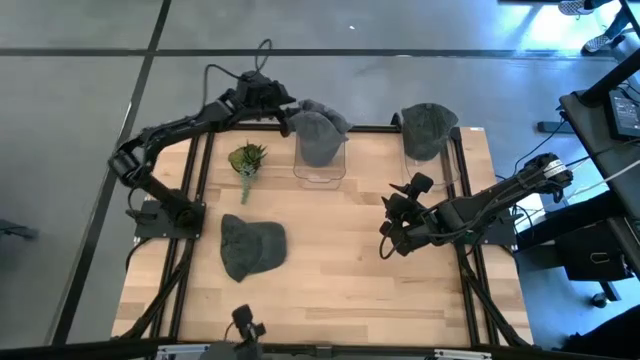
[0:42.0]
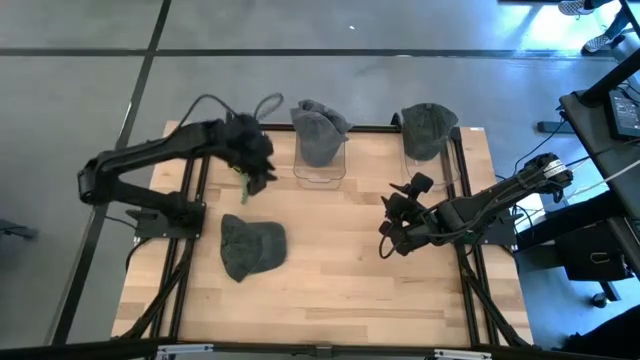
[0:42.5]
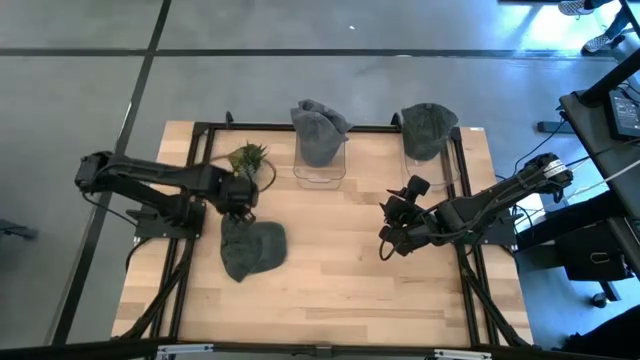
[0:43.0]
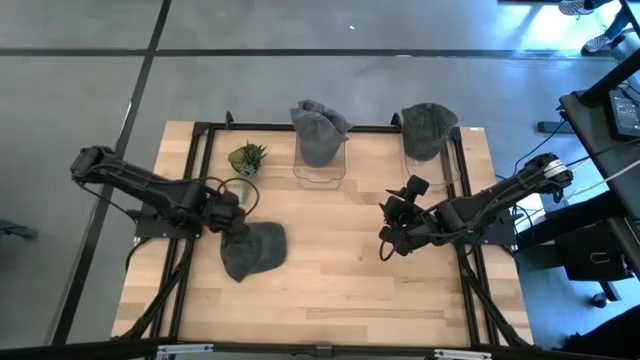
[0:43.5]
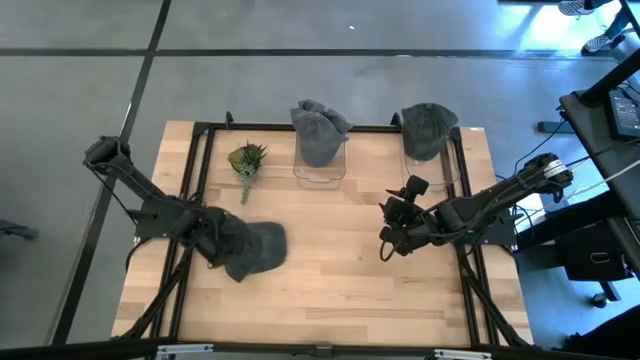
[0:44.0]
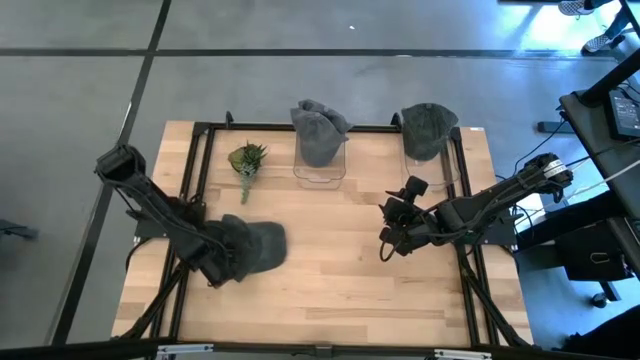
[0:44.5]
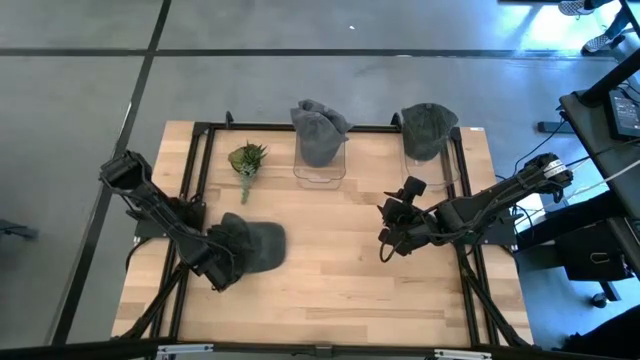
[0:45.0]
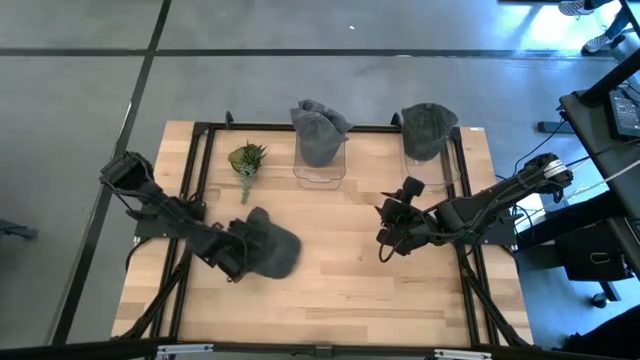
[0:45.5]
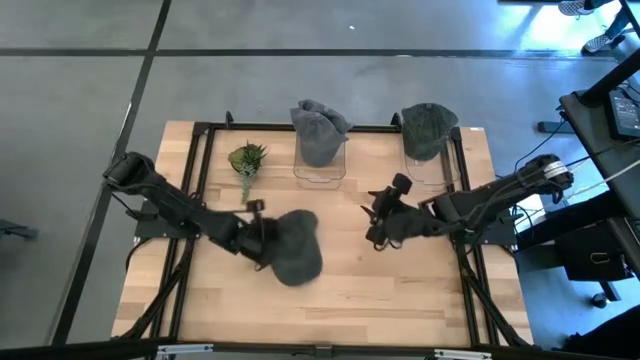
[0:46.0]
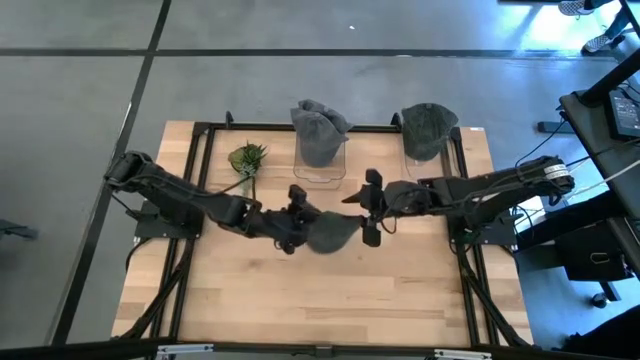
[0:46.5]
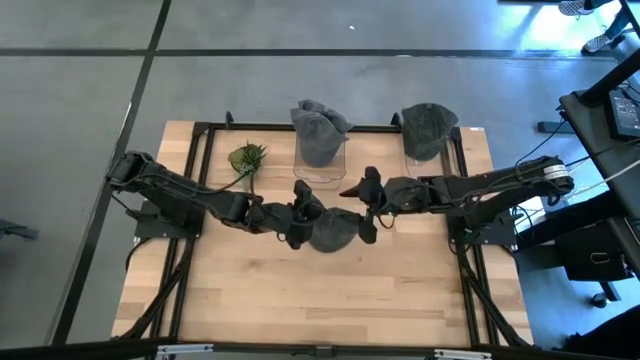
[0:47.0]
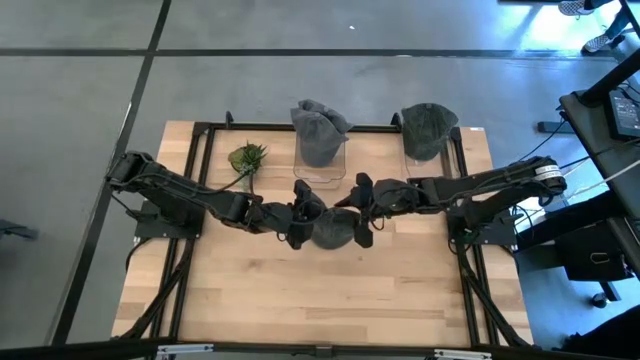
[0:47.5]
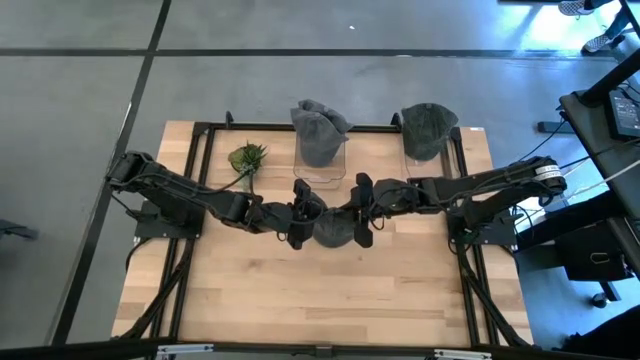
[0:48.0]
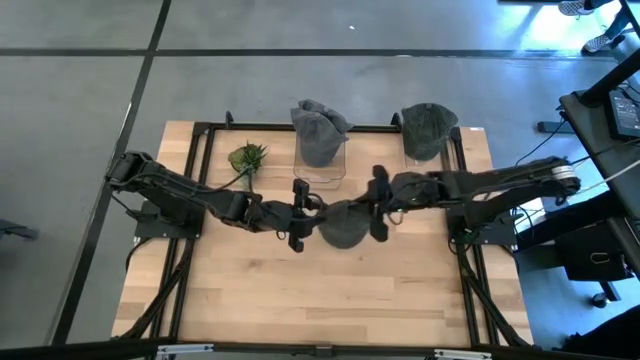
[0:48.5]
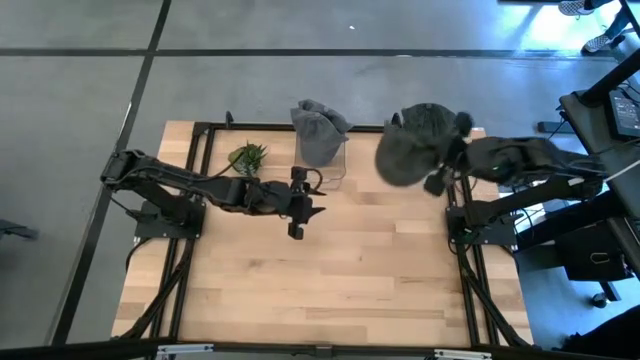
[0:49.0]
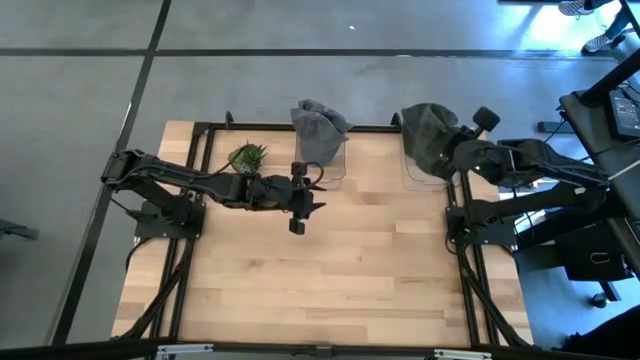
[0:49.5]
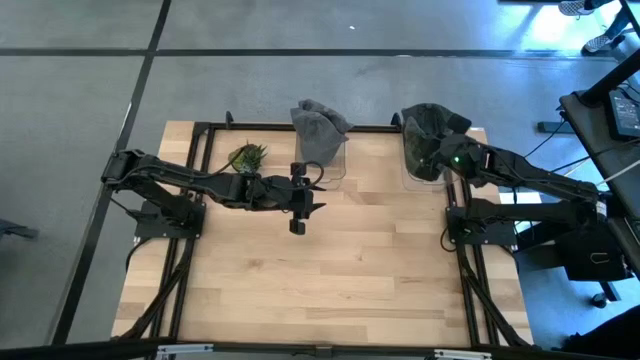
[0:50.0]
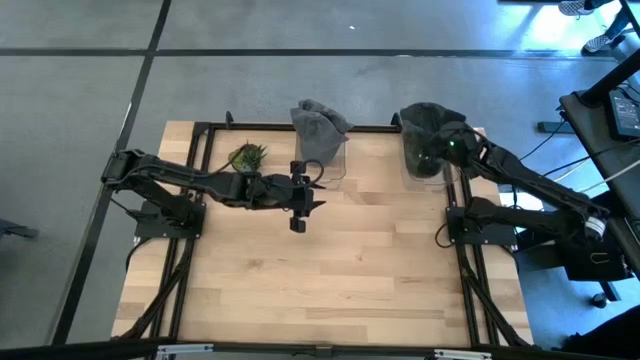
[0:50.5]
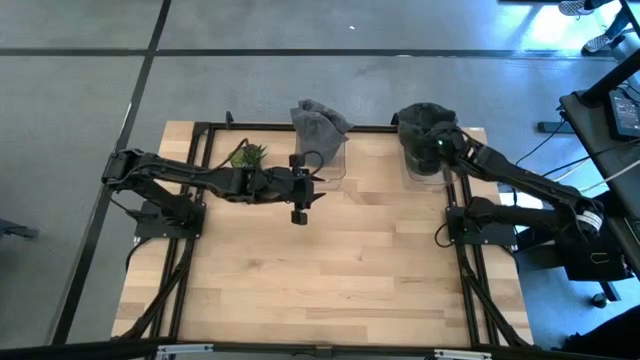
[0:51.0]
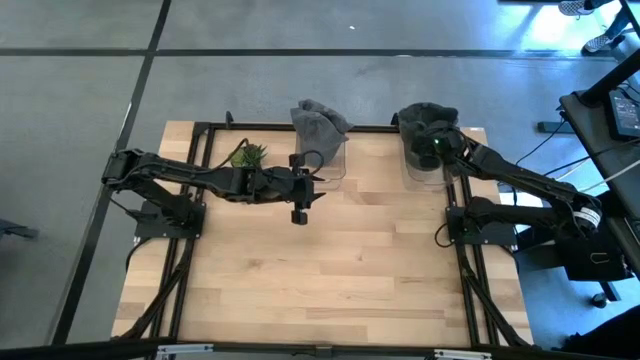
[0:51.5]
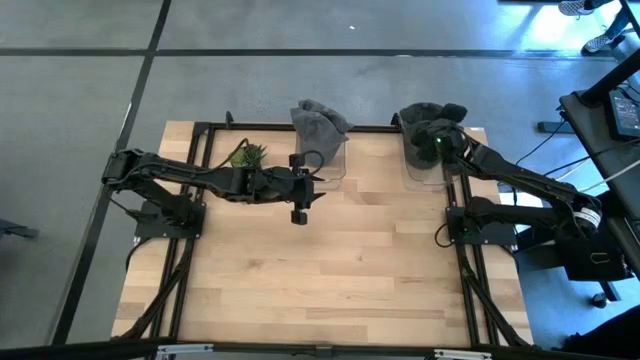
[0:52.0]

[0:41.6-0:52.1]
Task: Pick & Place hat
Put the green cap into the right transparent bin

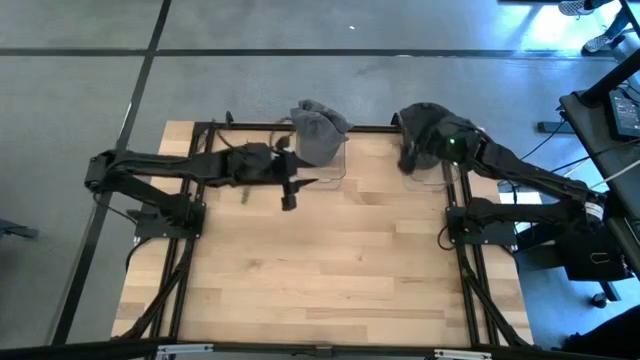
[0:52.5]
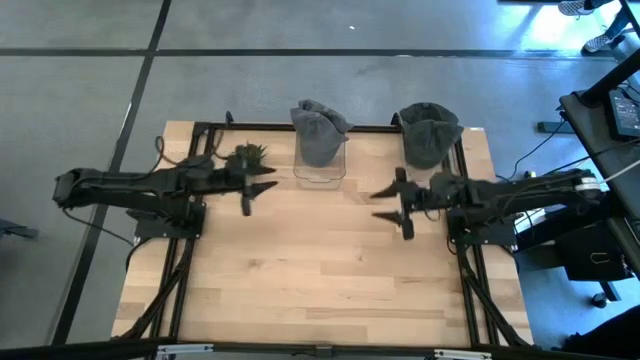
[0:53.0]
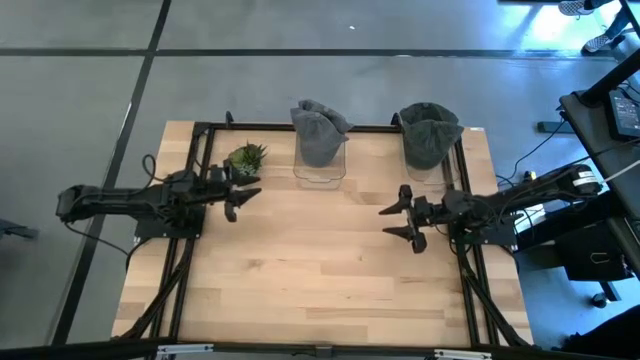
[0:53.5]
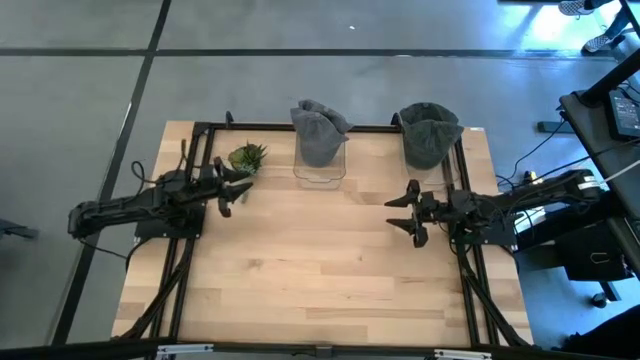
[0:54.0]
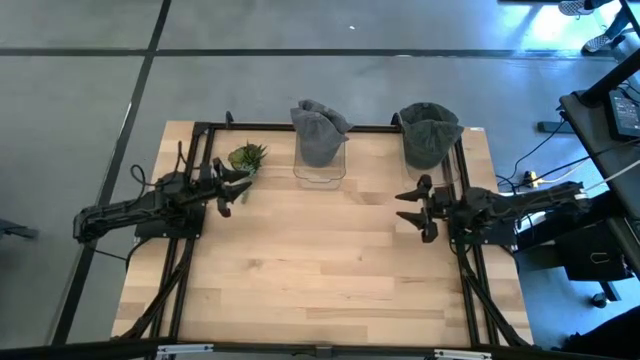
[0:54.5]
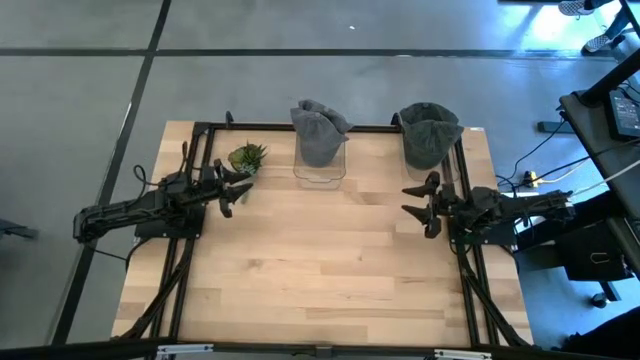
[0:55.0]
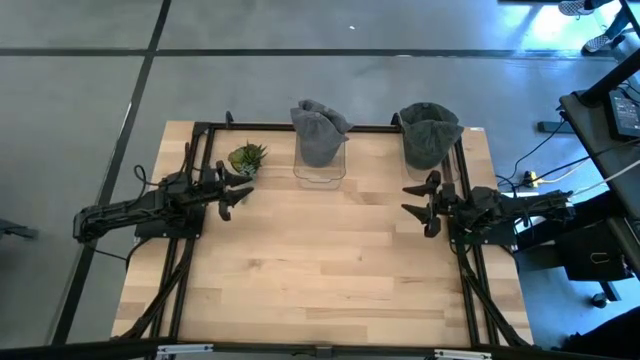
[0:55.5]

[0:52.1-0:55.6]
Return to Home Position

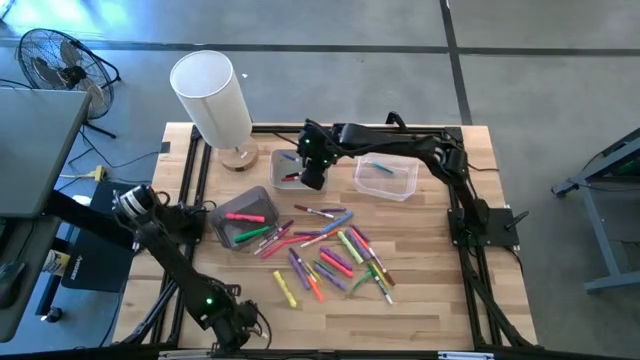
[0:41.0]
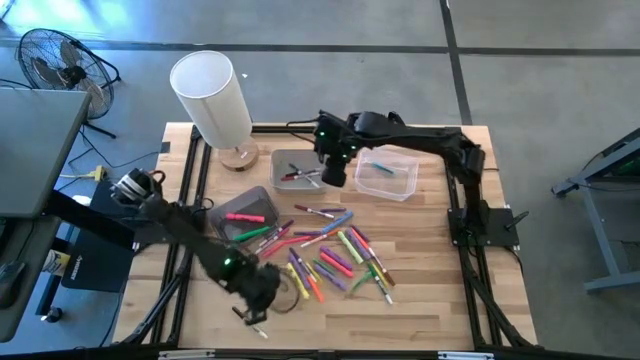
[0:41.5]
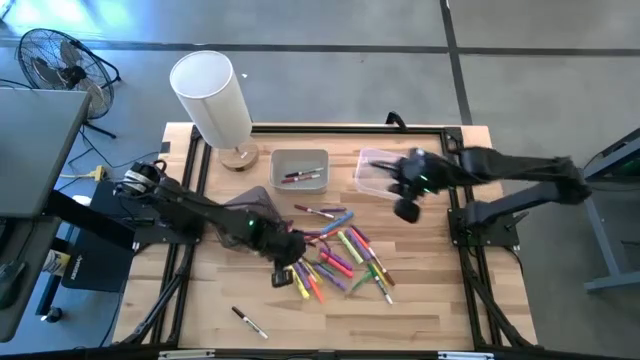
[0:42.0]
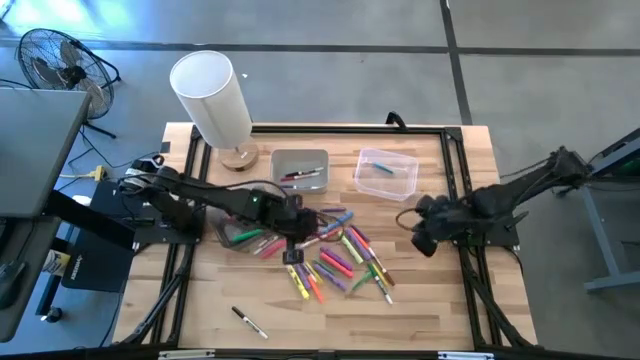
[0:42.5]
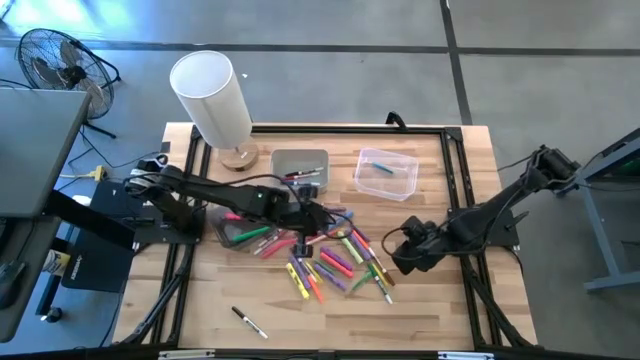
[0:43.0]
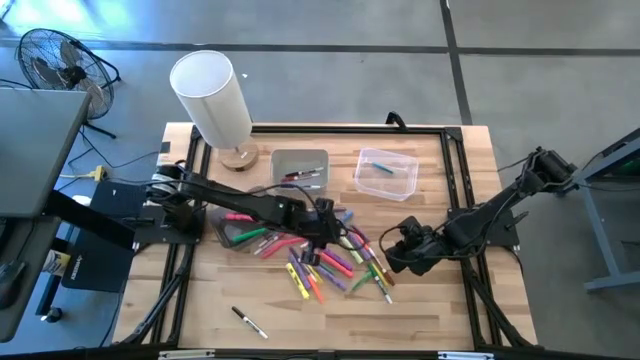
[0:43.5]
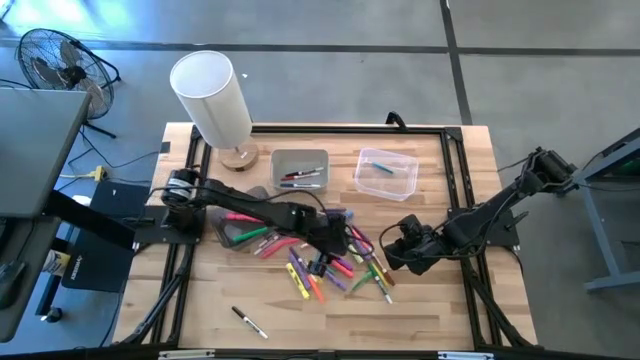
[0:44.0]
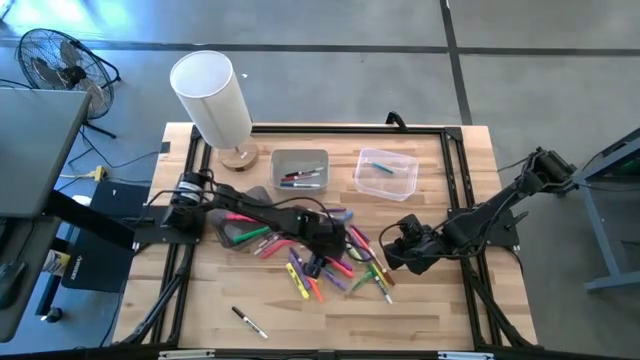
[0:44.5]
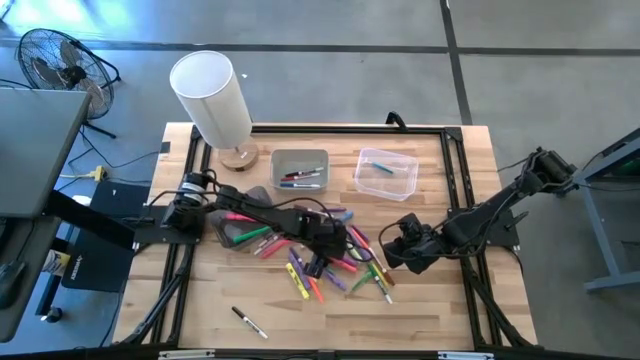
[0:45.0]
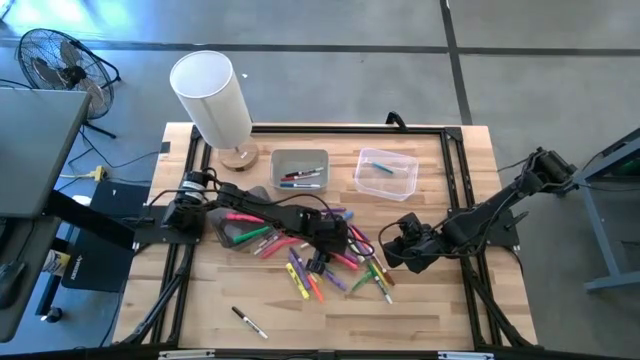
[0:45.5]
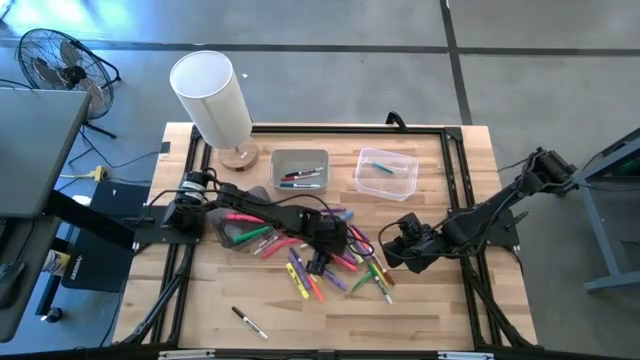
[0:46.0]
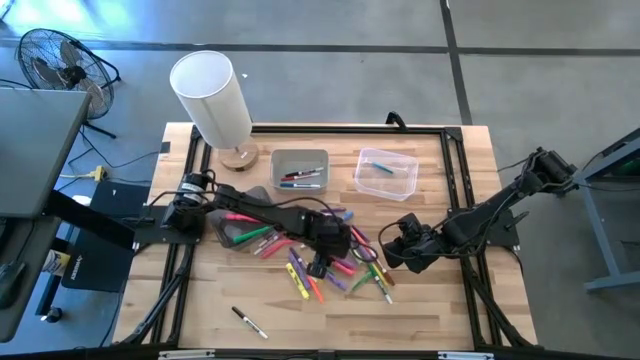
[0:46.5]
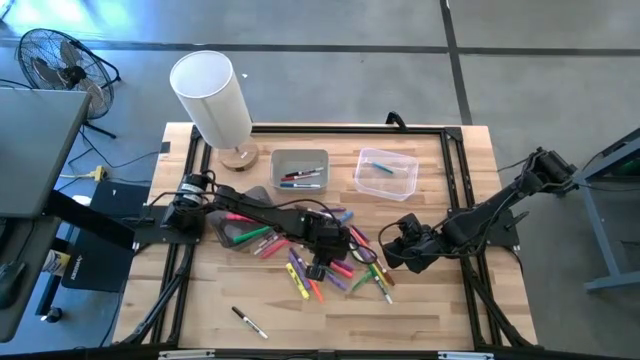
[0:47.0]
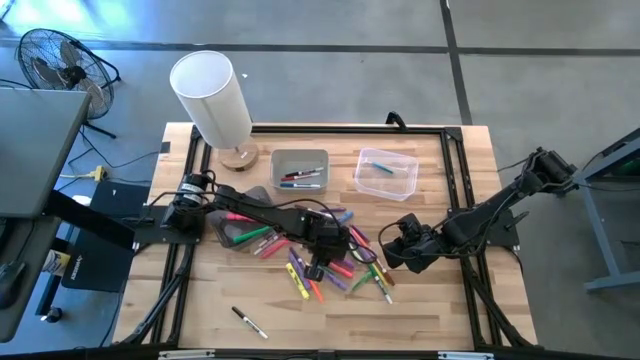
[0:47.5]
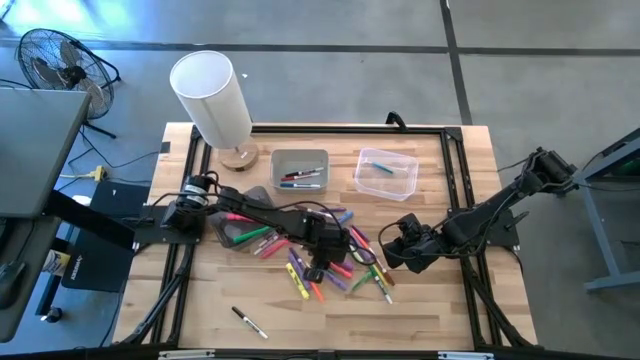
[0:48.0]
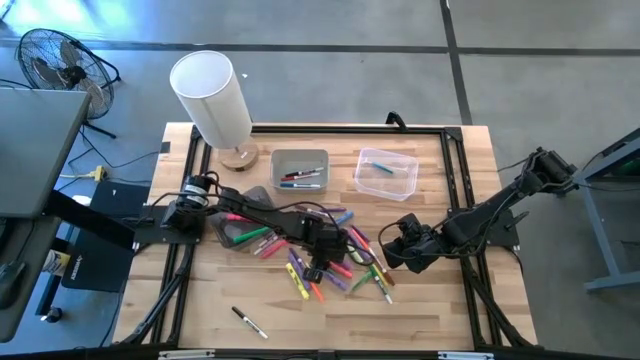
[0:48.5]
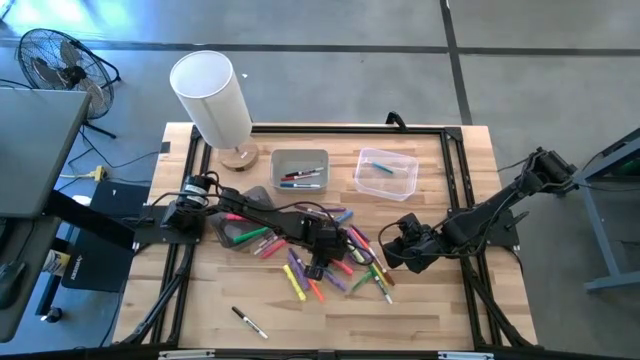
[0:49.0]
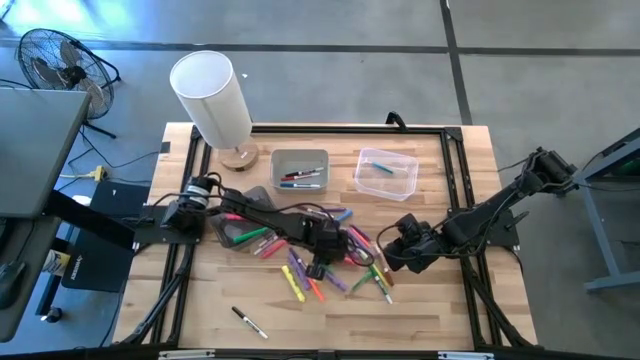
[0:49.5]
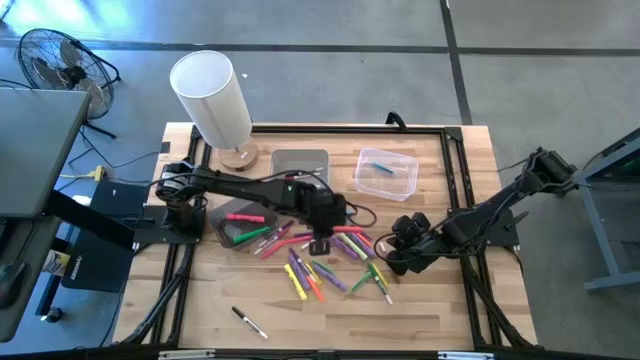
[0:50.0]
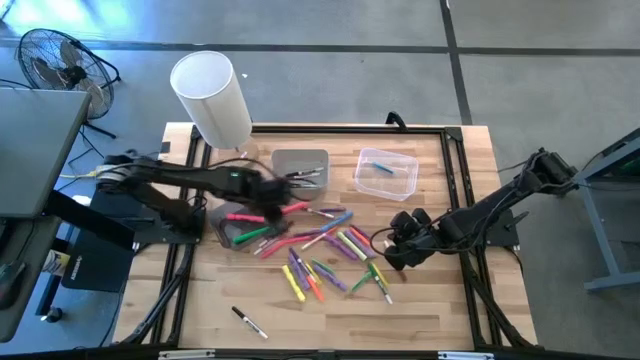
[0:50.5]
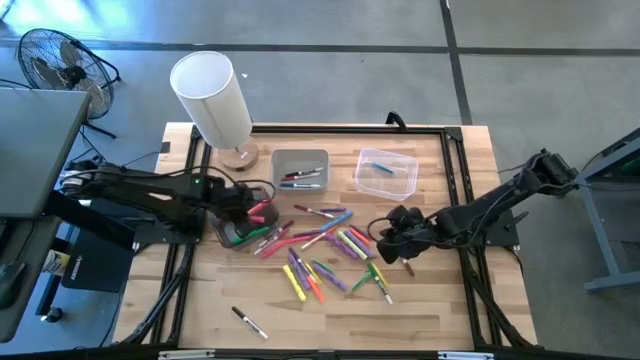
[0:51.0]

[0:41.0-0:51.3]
Task: Pick & Place Markers
Put the orange highlighter pen into the black bin
